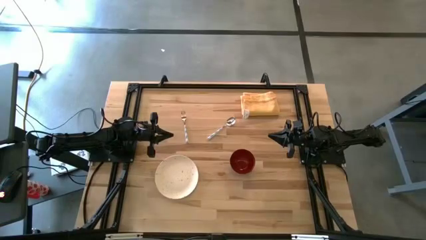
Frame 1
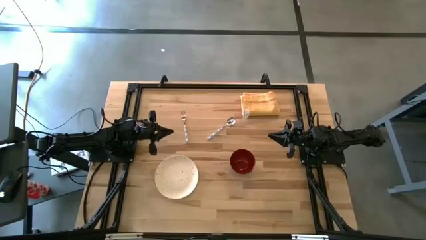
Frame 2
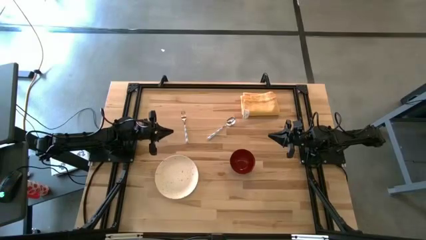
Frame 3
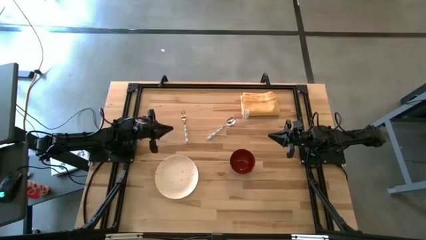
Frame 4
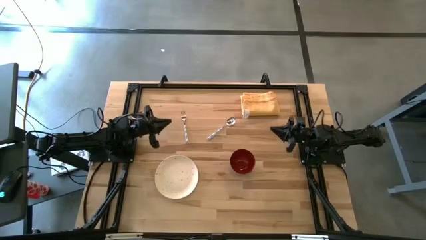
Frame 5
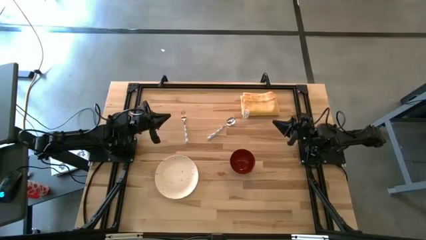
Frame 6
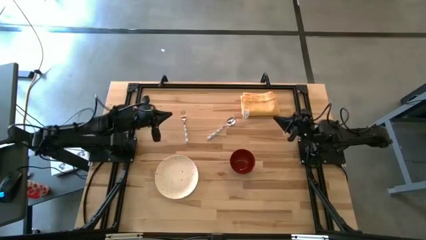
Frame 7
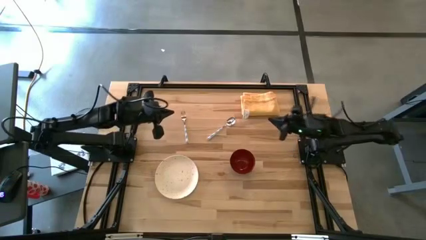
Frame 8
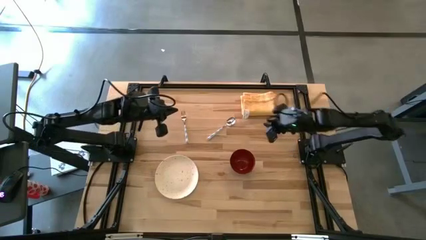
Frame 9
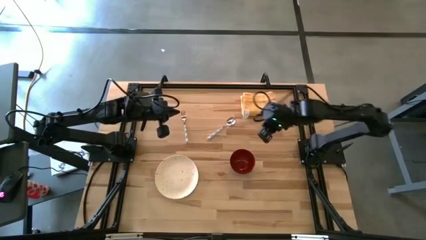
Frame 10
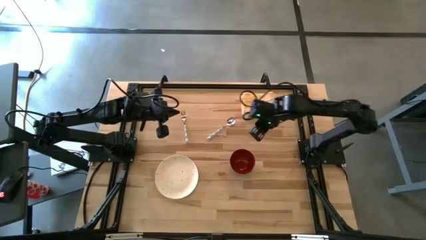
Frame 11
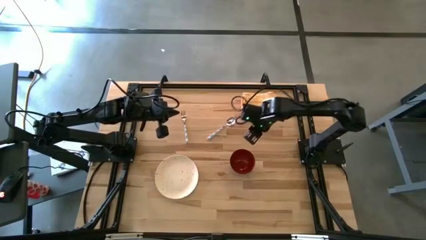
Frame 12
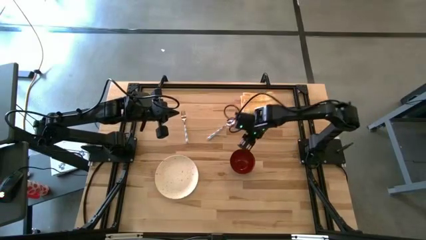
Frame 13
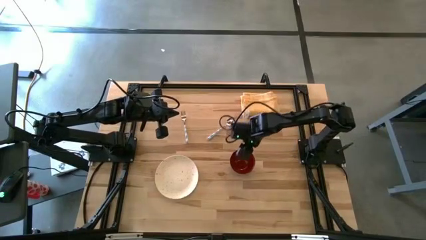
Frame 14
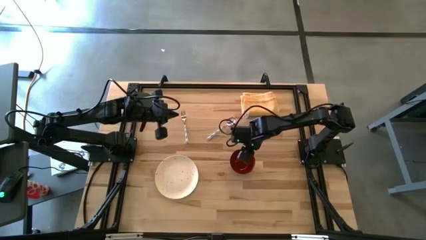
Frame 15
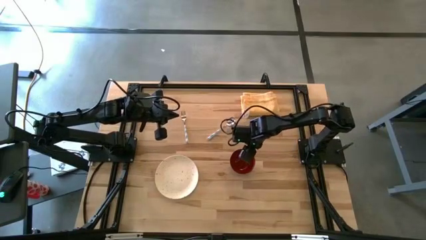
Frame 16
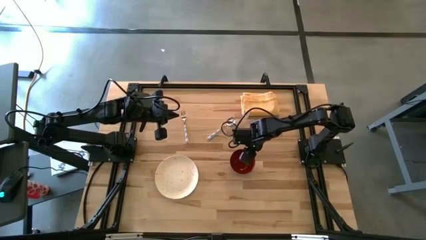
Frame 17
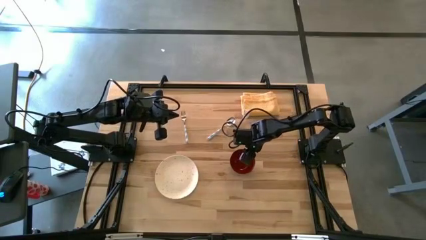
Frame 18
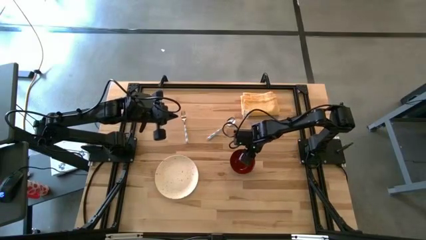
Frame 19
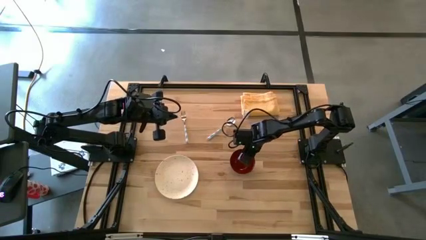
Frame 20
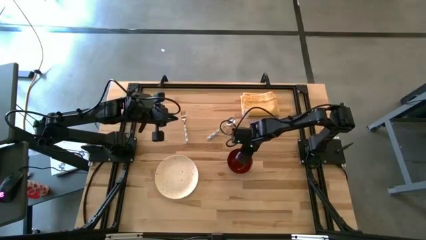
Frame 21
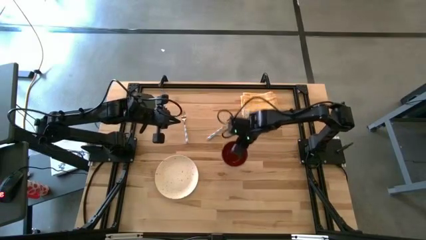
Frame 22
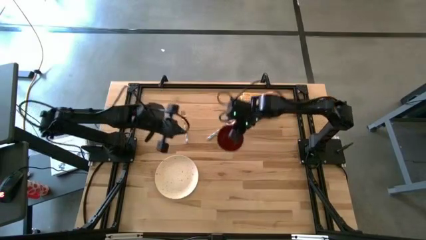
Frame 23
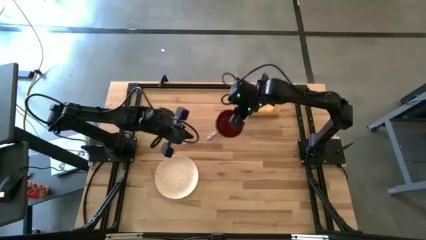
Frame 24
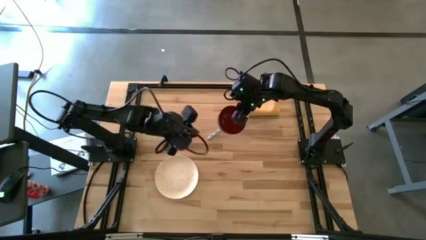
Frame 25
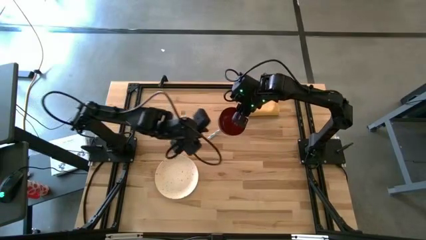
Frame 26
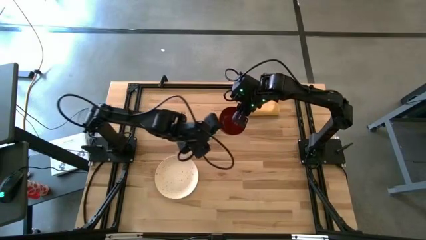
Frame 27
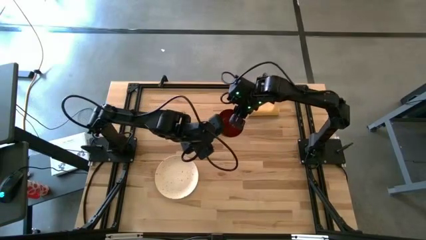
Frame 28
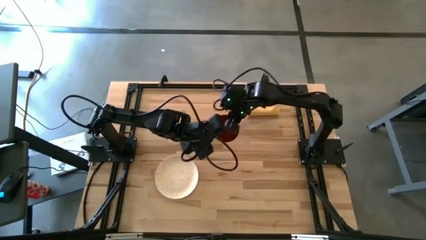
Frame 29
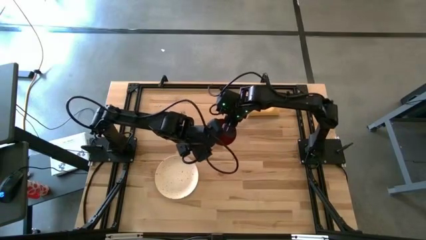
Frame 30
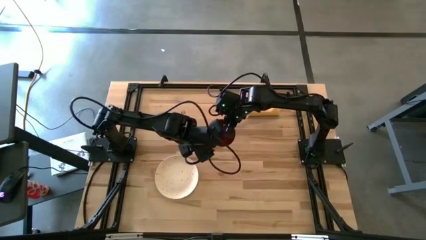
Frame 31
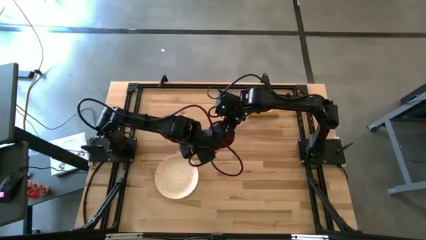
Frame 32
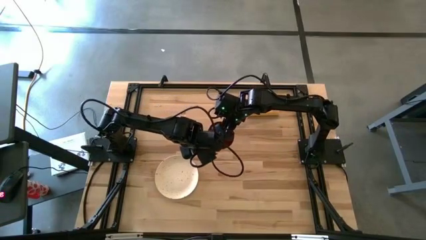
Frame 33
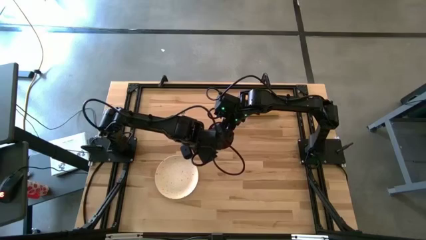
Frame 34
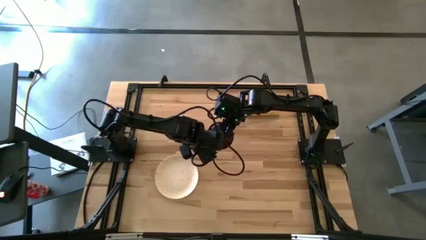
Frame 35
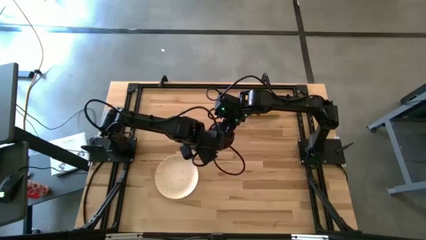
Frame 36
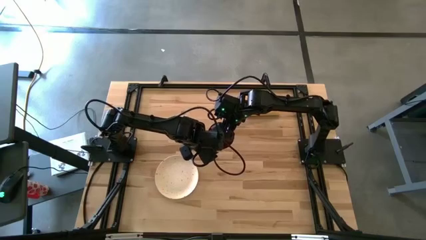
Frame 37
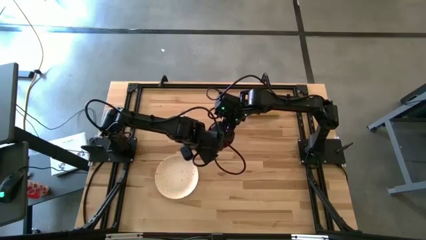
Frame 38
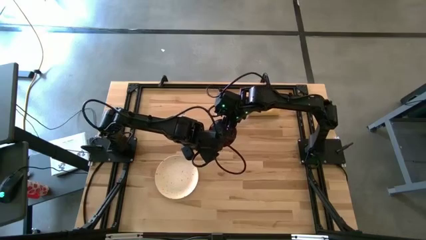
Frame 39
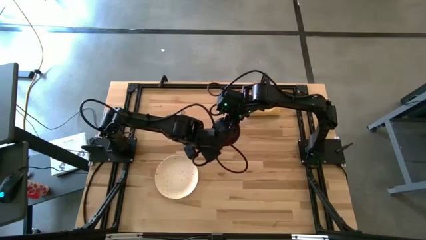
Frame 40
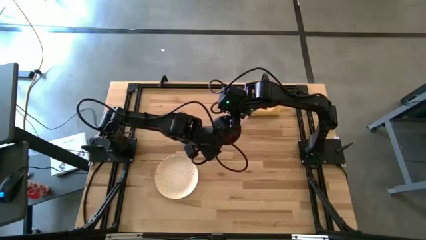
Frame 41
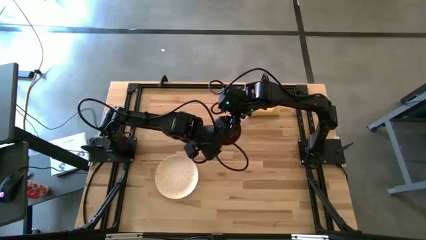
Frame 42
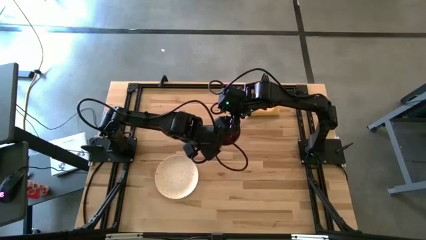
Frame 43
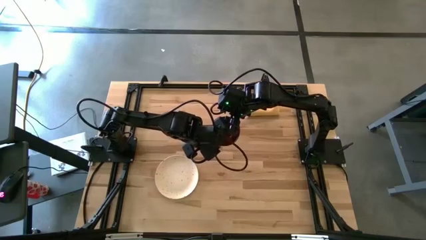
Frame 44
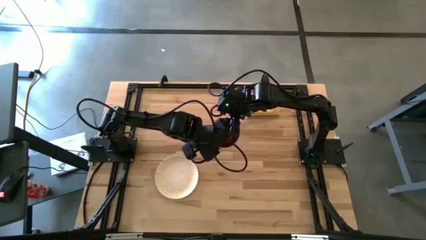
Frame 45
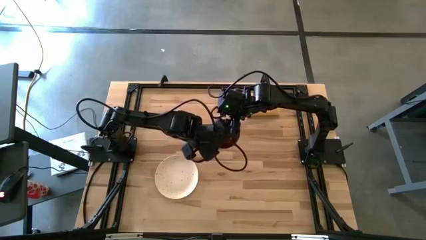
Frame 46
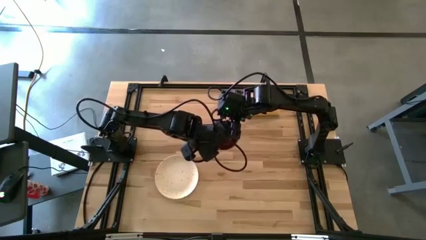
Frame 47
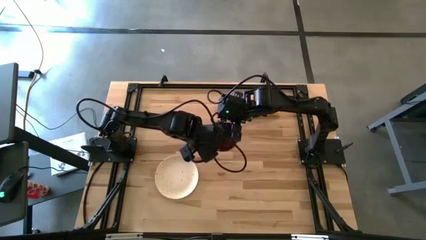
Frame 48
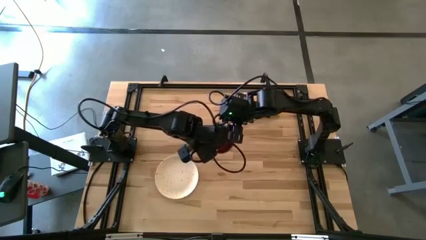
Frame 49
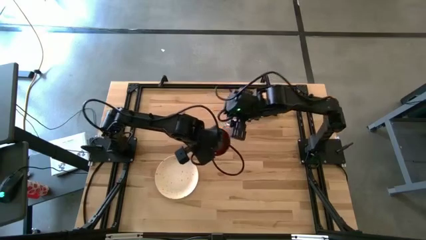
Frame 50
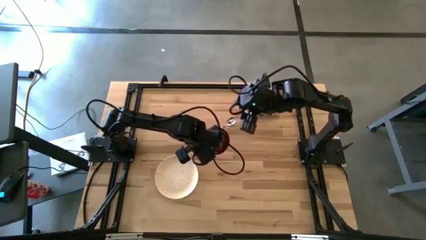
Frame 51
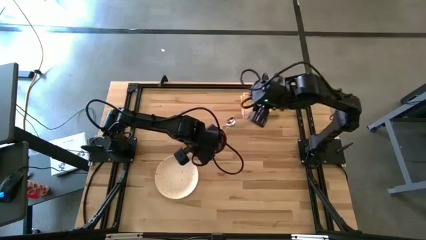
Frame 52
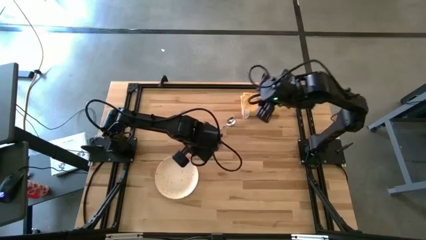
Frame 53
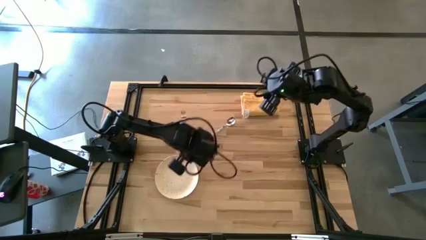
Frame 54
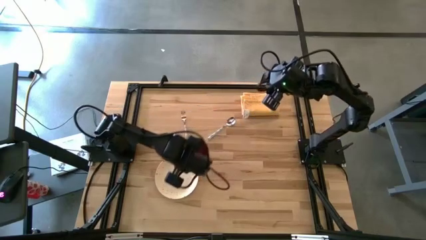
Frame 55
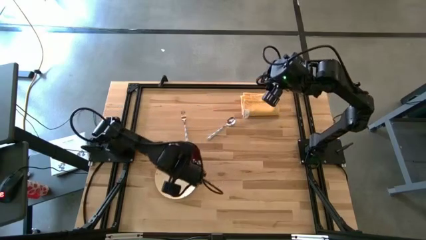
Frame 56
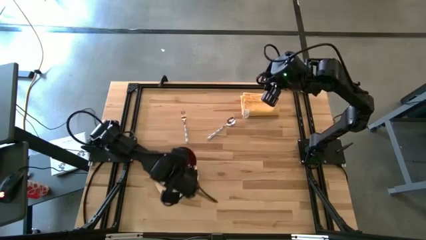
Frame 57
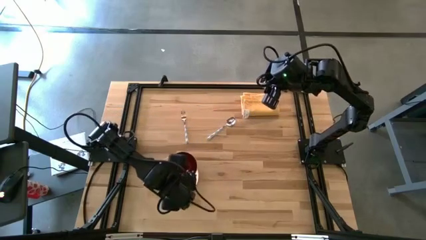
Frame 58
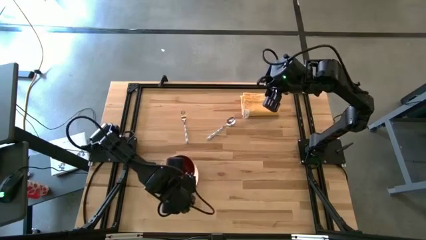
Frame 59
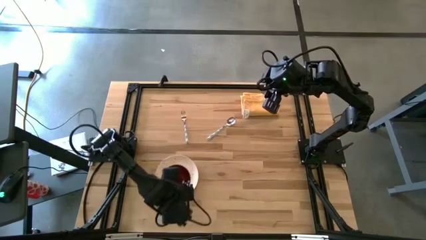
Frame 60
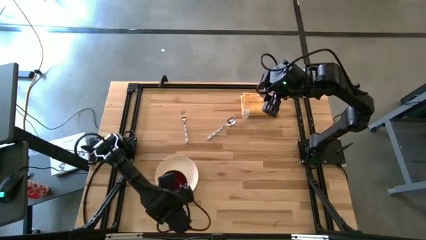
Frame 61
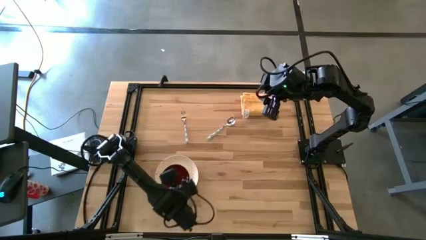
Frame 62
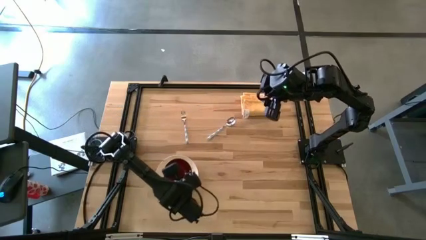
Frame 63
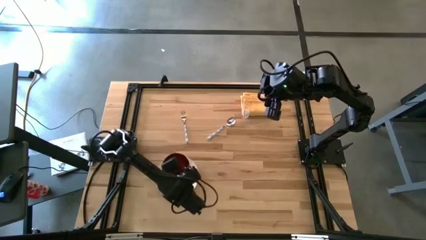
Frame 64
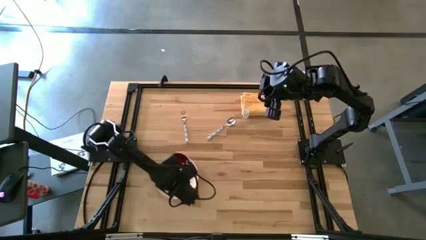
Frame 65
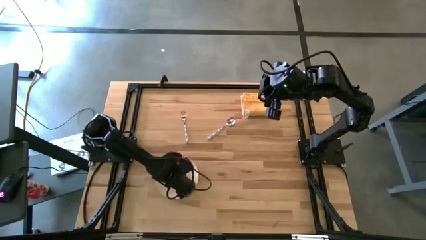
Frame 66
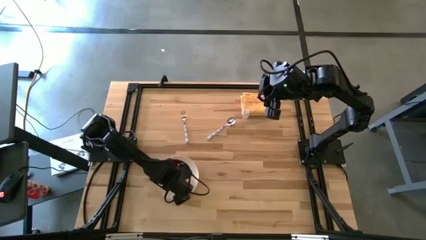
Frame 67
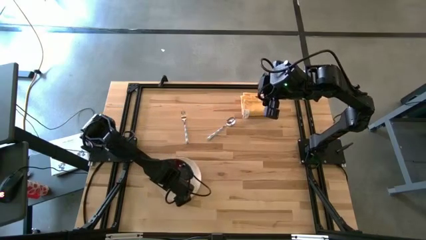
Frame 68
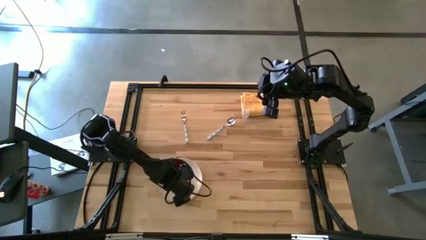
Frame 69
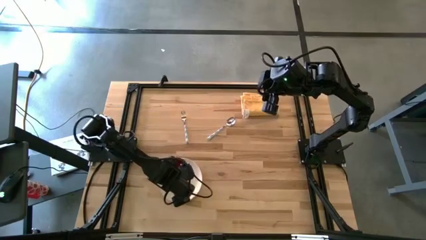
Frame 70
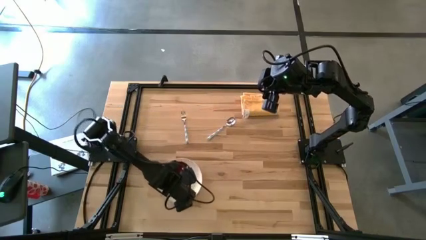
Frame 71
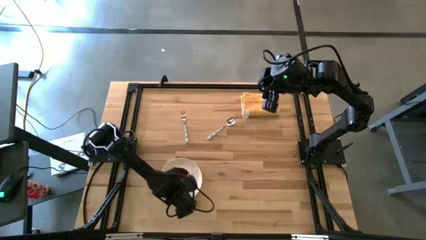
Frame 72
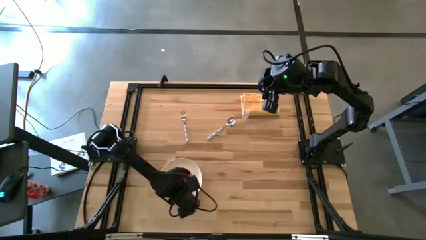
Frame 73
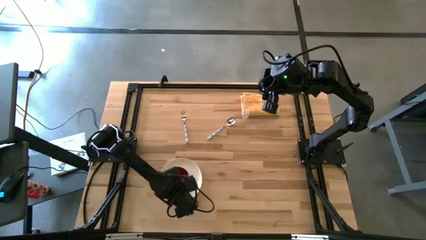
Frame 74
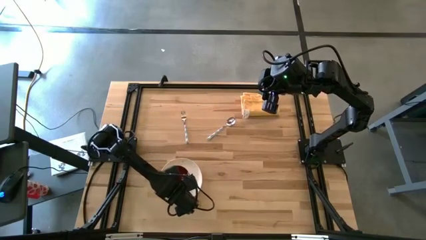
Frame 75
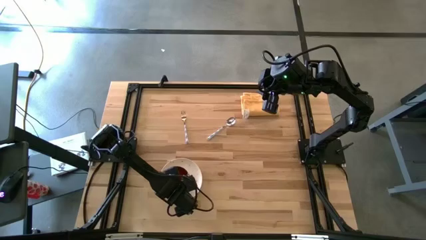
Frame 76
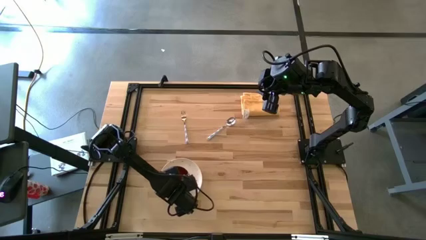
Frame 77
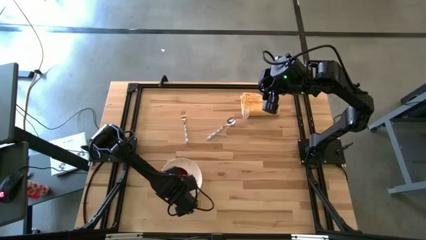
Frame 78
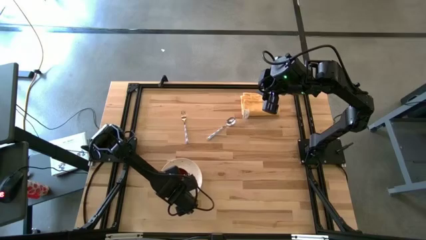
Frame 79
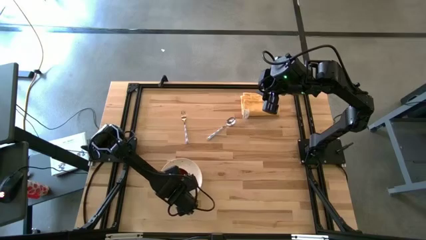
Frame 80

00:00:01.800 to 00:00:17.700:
Task: Set table place
Put the black bowl on top of the white plate
